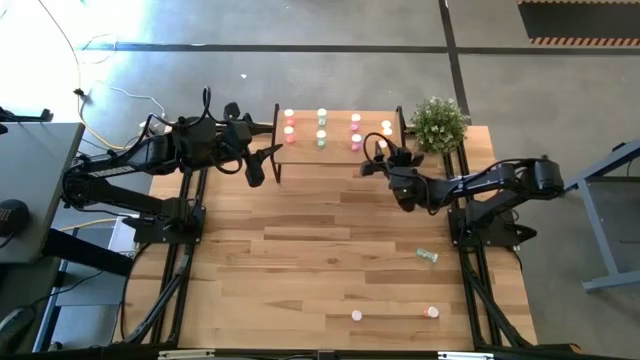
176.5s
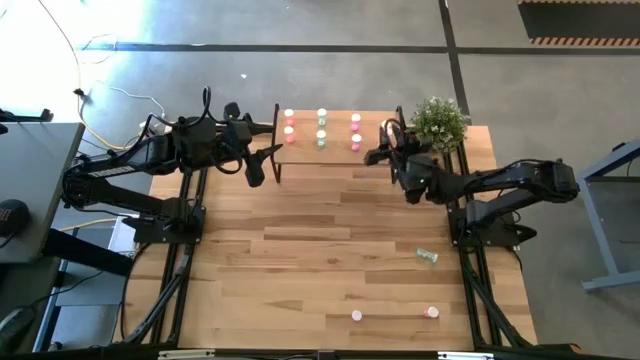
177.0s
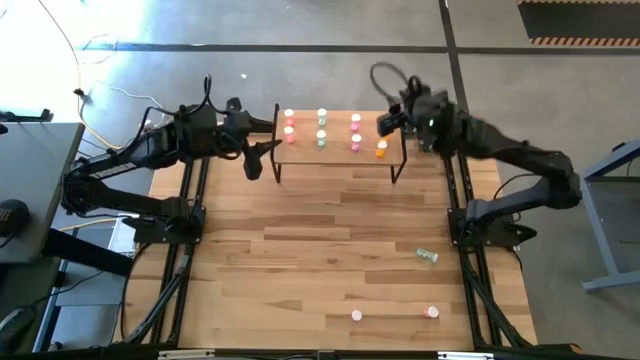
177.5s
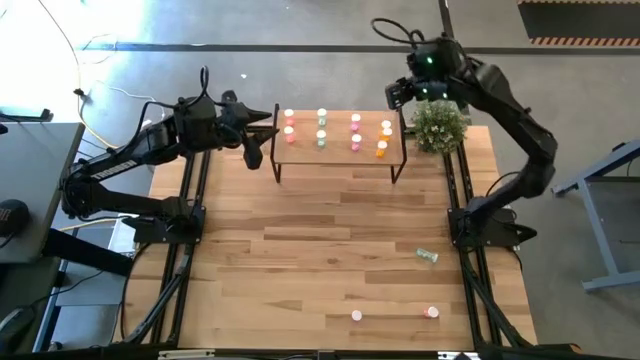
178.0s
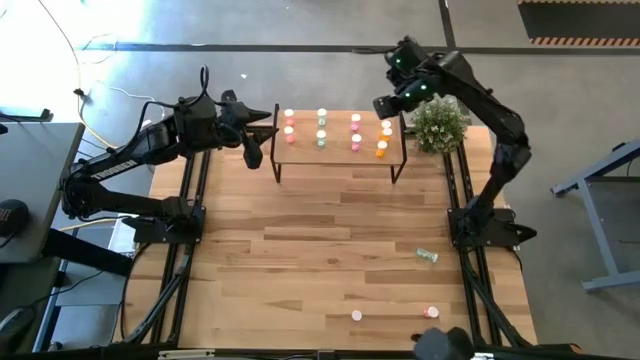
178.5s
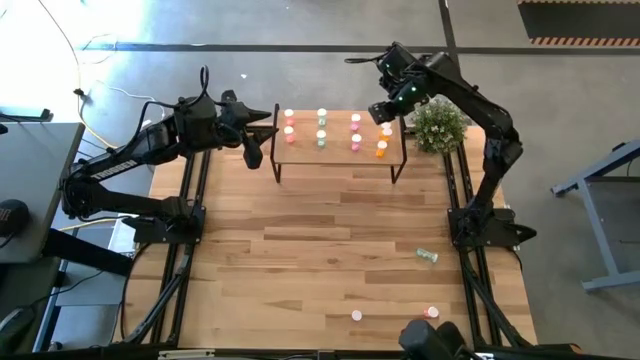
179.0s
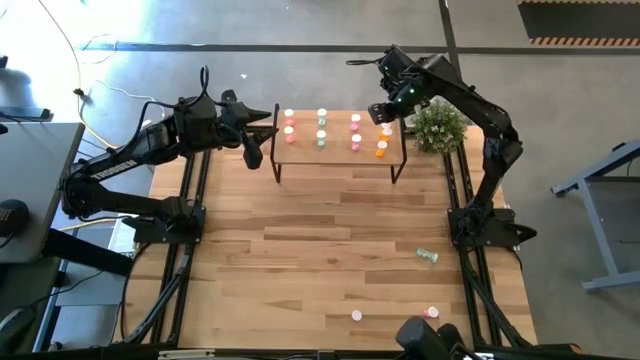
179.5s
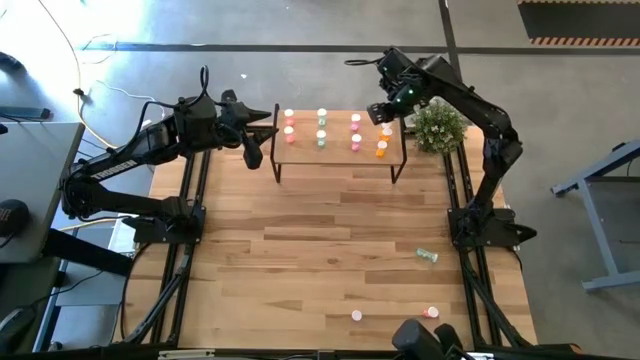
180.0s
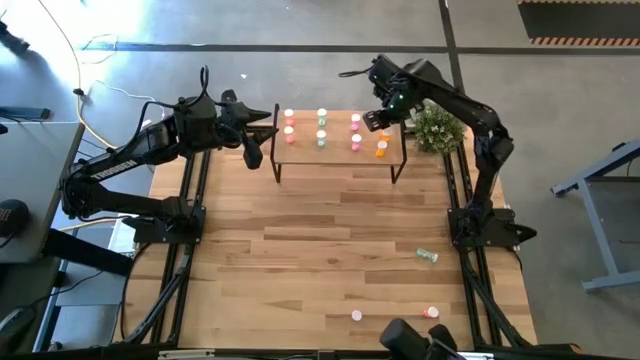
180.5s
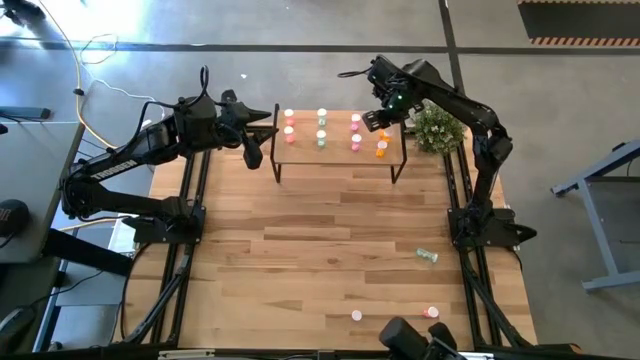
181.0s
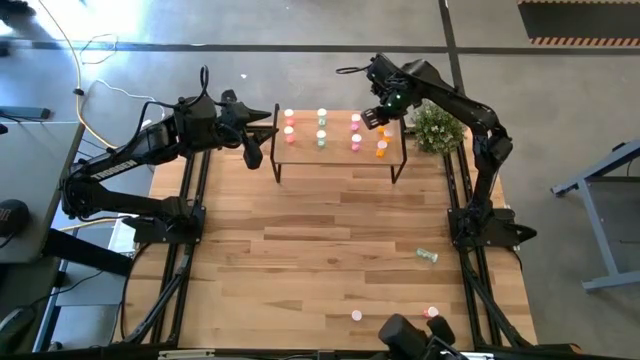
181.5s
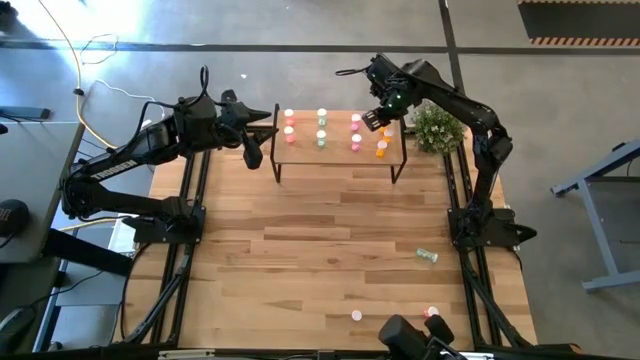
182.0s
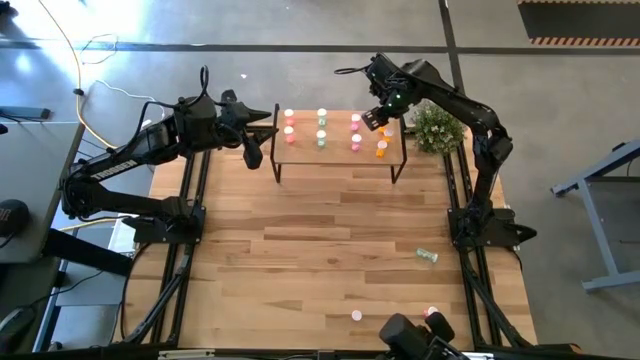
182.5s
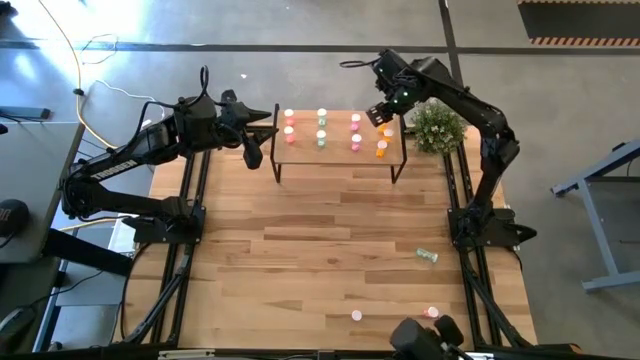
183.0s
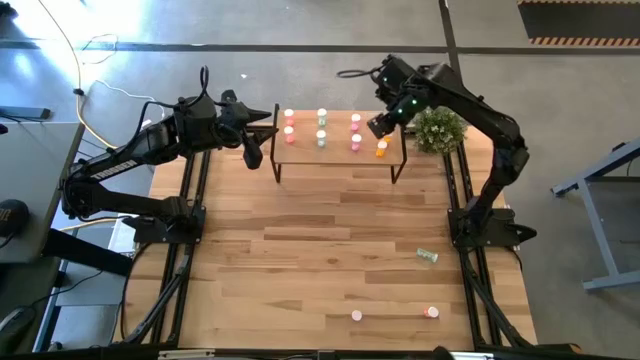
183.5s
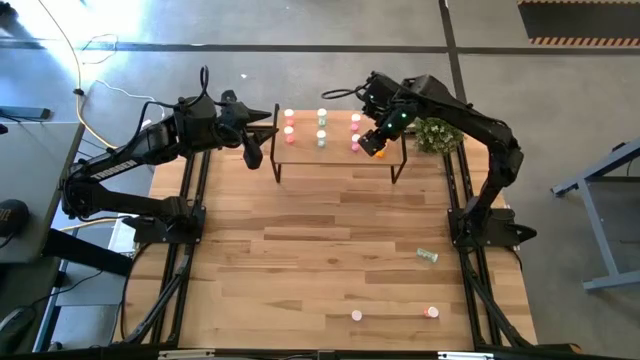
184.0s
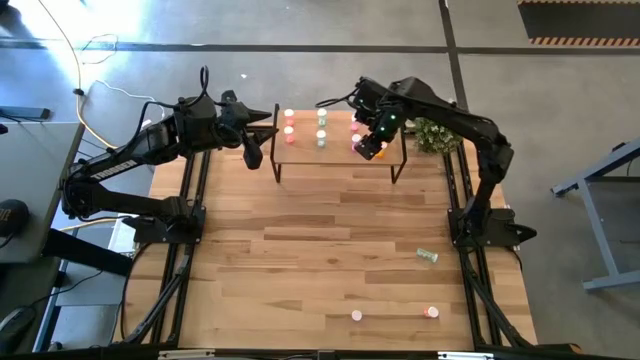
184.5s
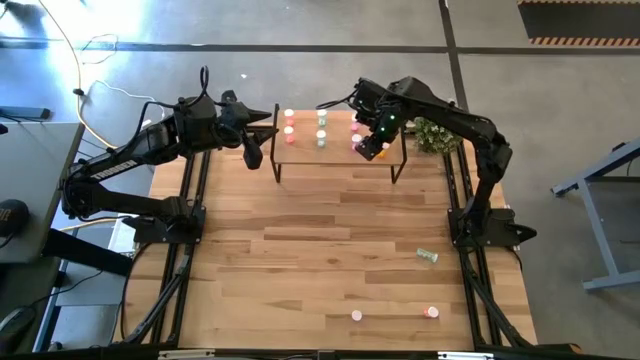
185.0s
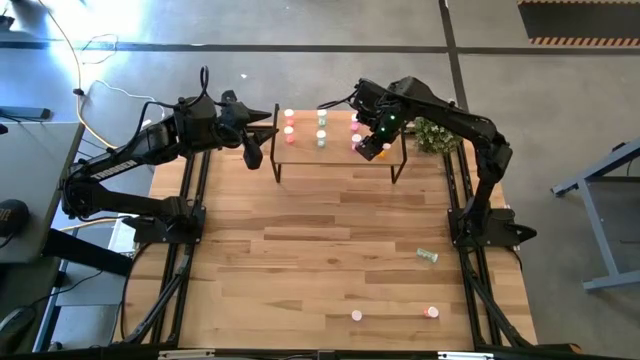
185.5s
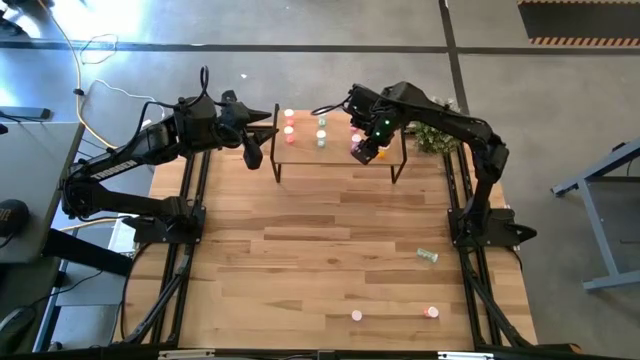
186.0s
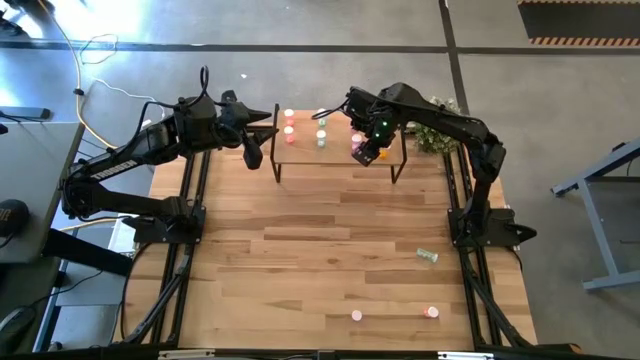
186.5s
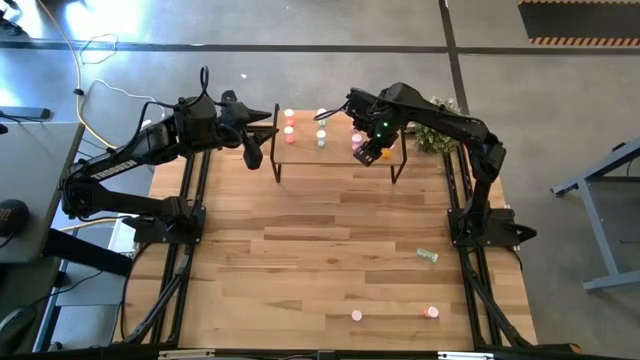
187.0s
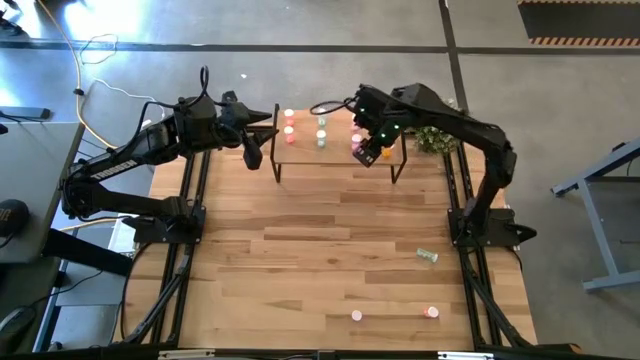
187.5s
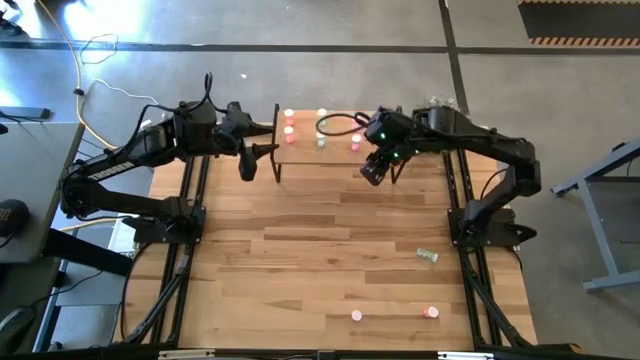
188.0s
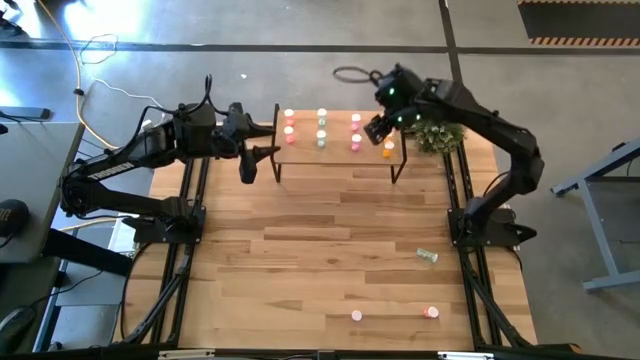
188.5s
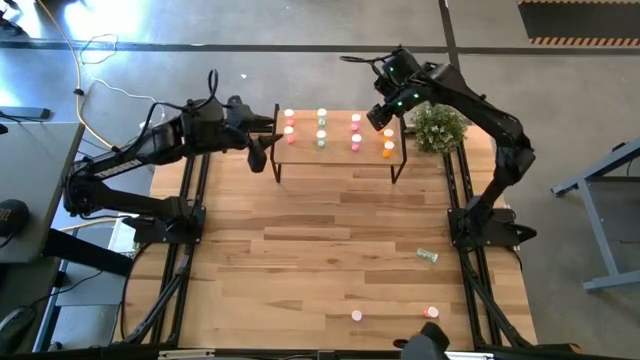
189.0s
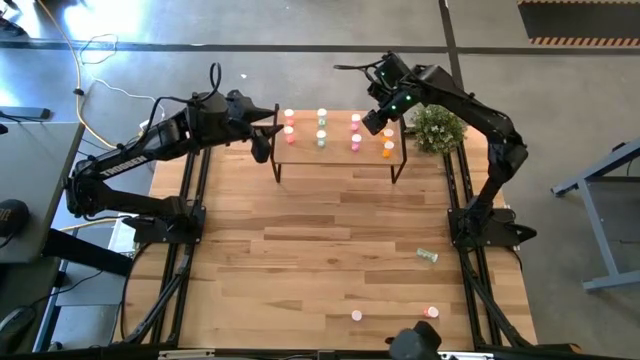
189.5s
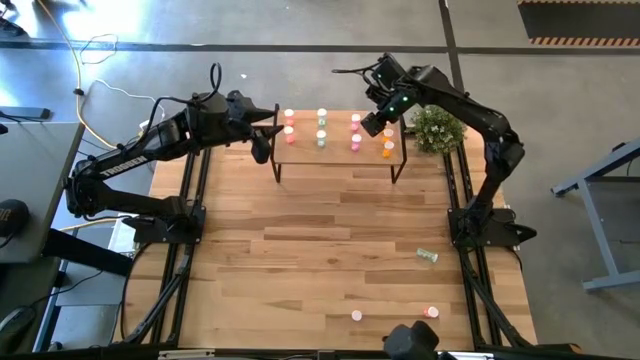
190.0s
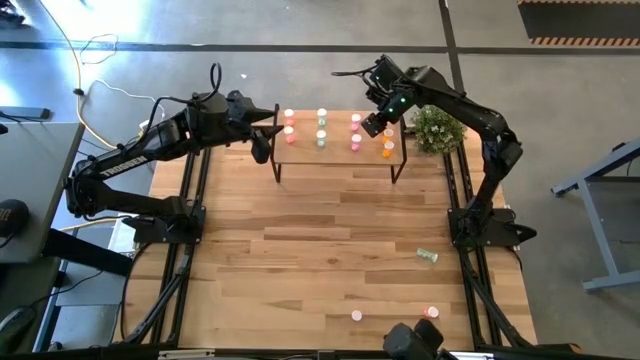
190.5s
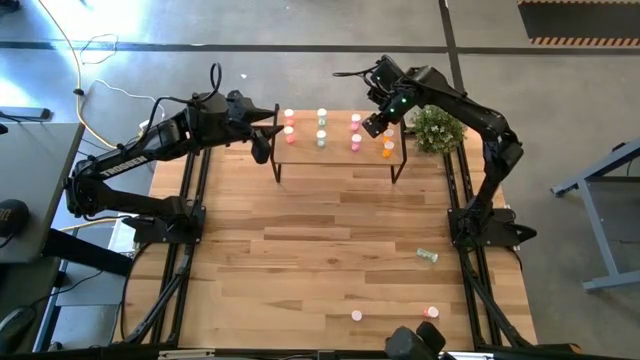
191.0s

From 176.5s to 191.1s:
Task: Pick and place medicine bottles onto shelf by color
Adjust the yellow pill bottles on the shelf

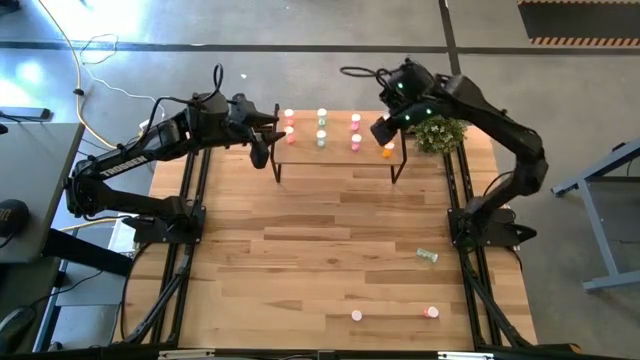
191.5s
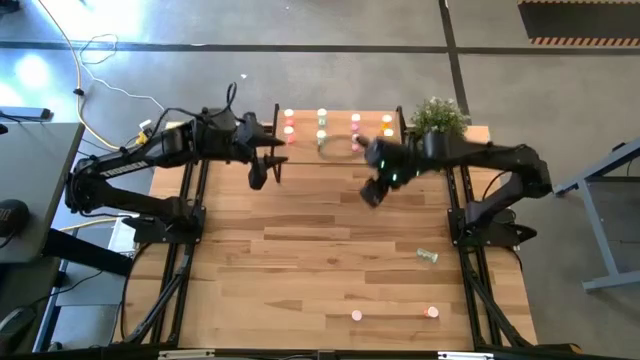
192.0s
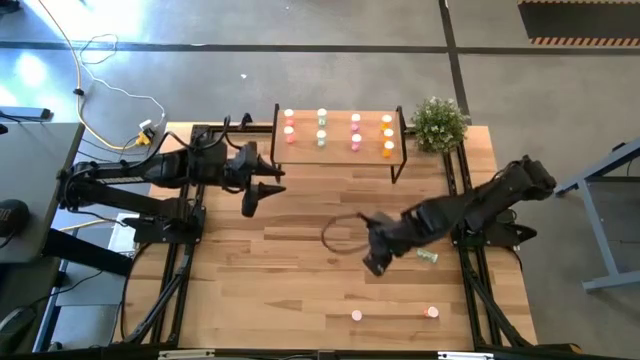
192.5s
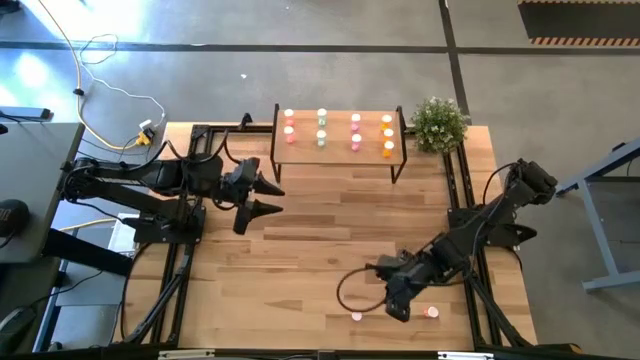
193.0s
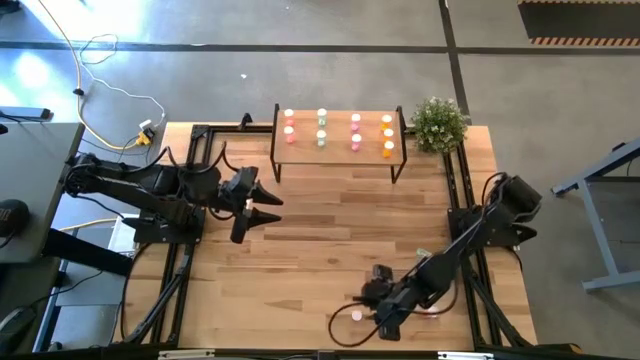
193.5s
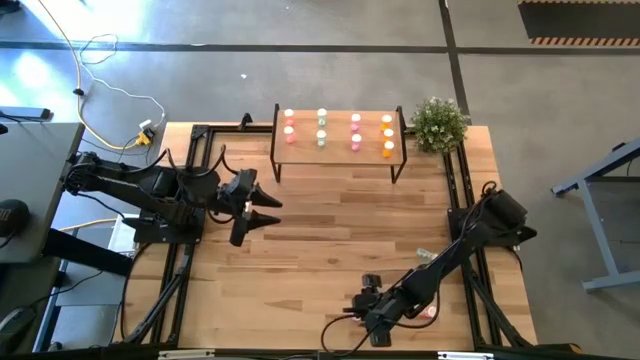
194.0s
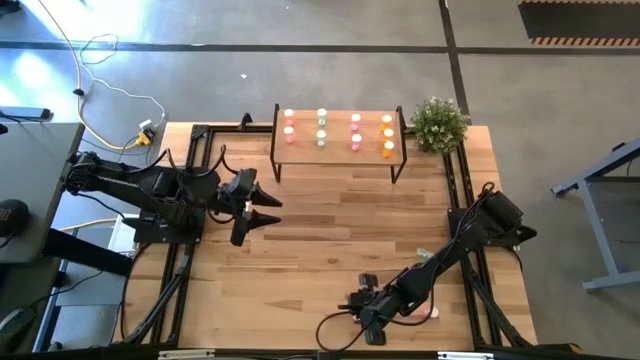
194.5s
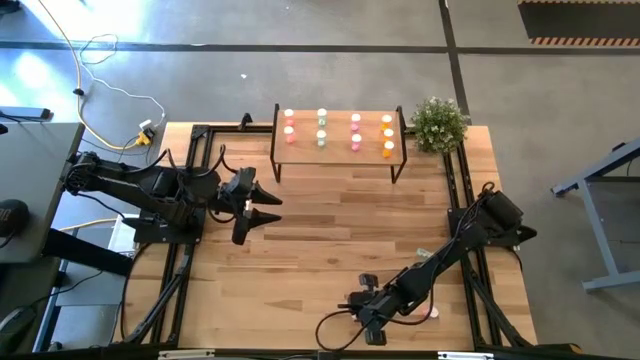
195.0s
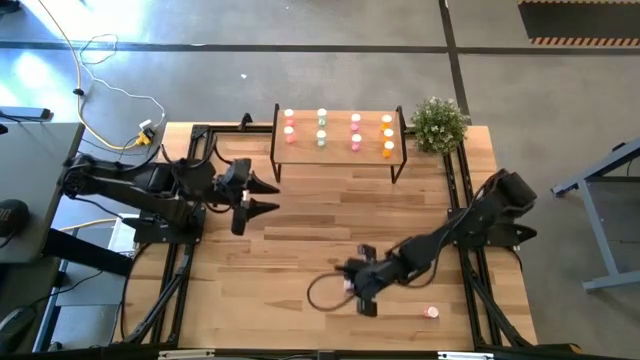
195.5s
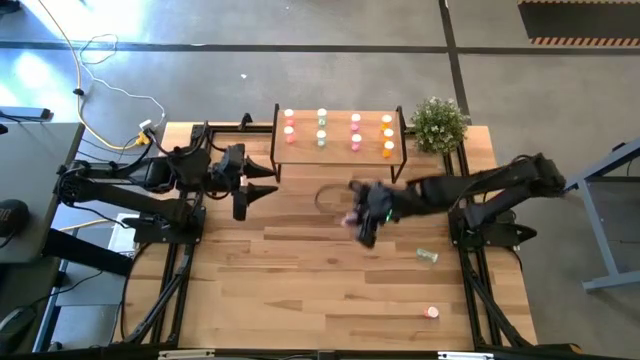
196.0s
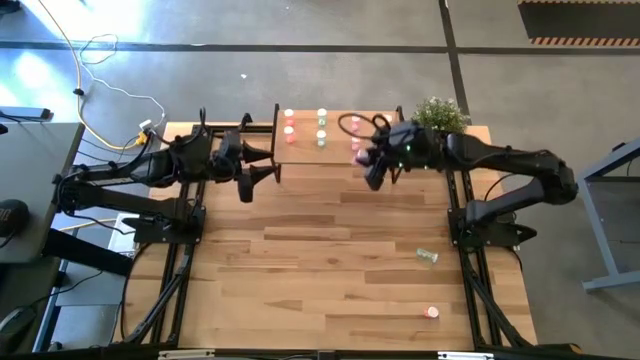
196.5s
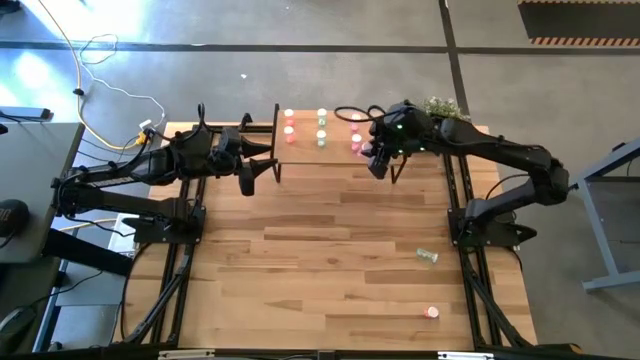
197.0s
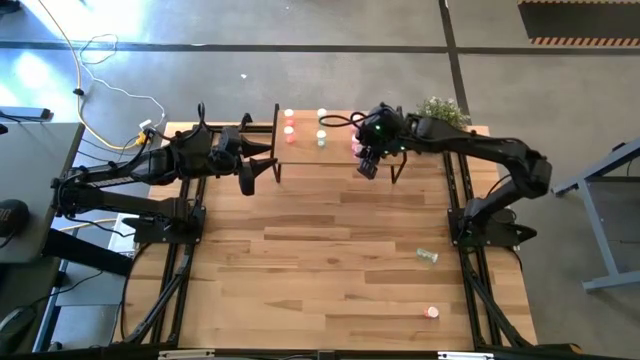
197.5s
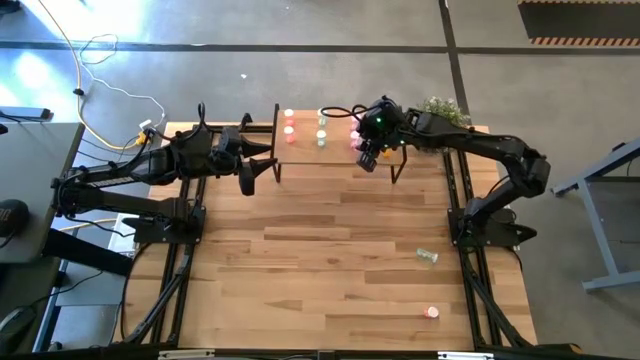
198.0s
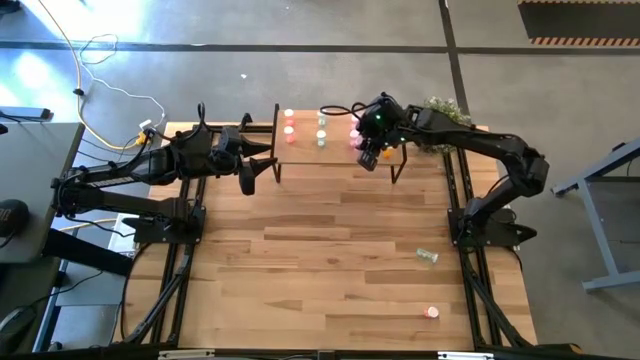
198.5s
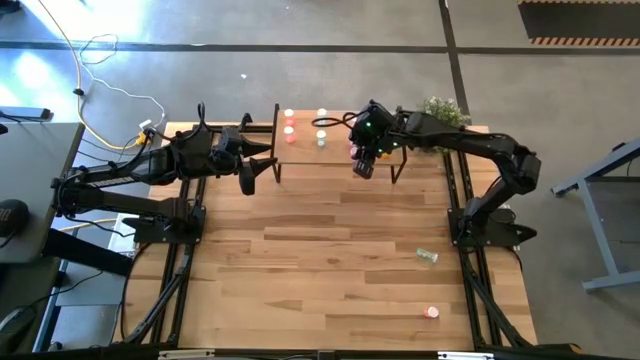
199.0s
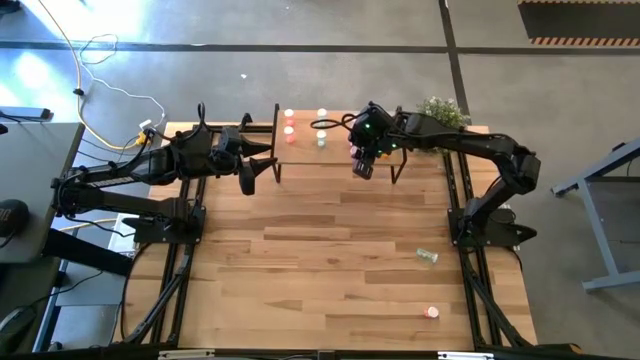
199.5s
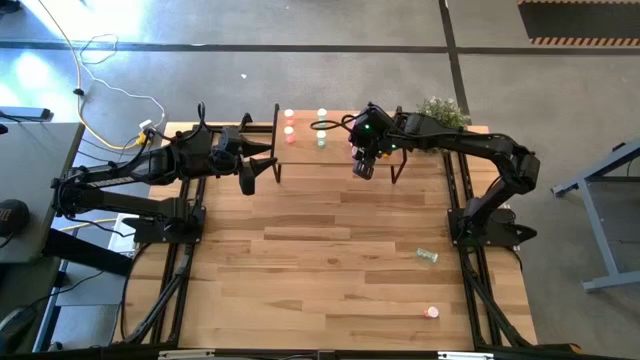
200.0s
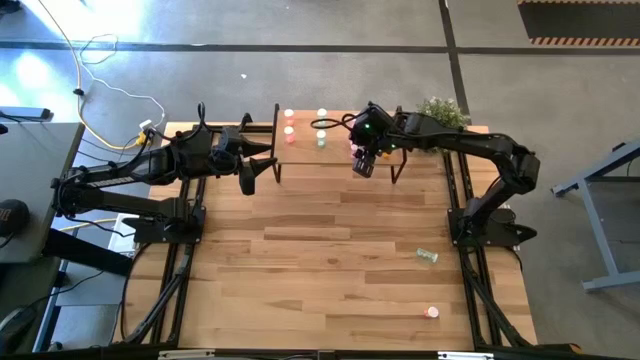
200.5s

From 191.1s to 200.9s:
Put the purple pill bottle on the shelf aligned with the other purple pill bottles
